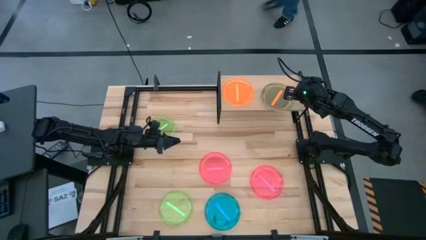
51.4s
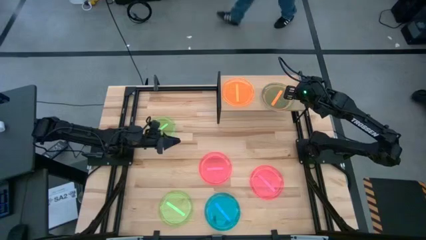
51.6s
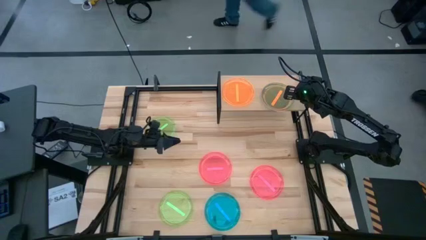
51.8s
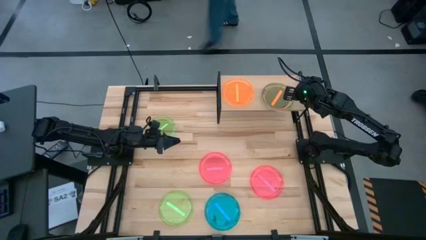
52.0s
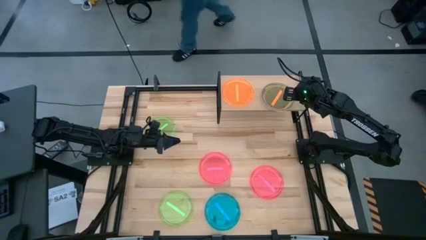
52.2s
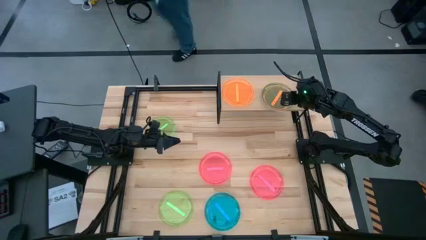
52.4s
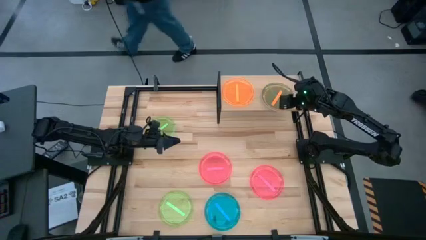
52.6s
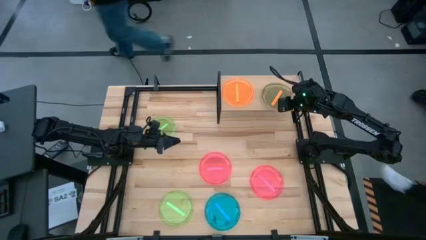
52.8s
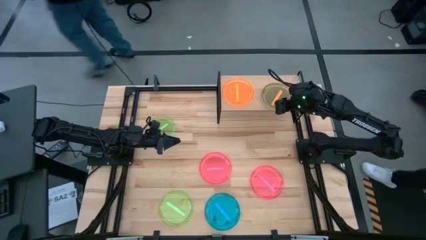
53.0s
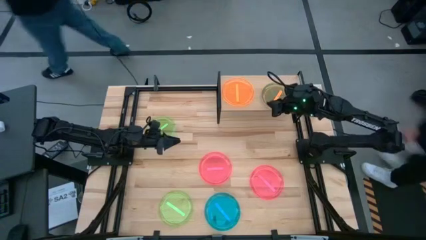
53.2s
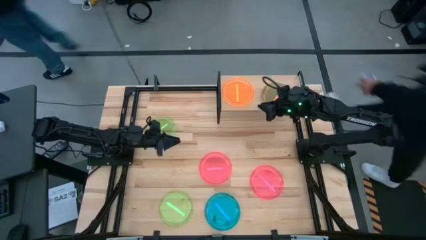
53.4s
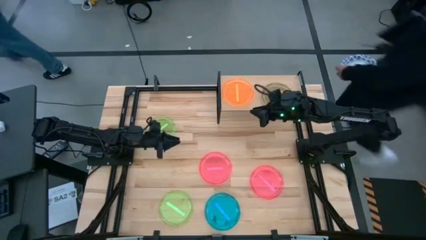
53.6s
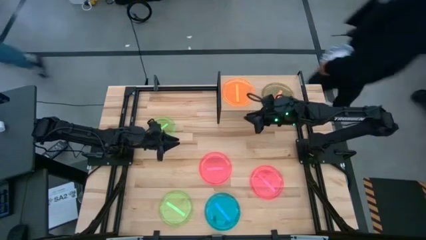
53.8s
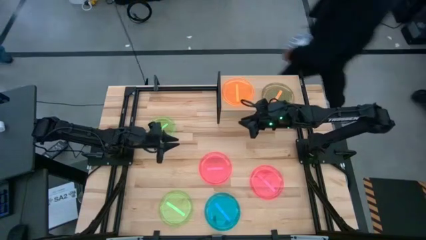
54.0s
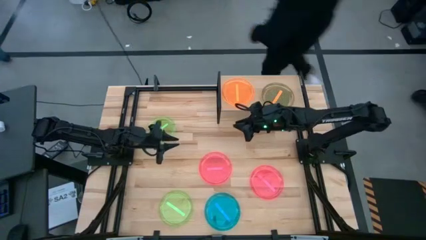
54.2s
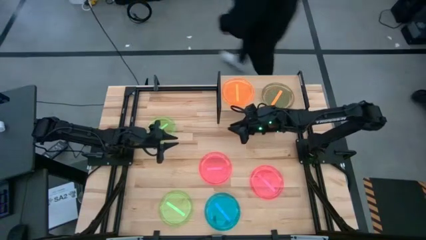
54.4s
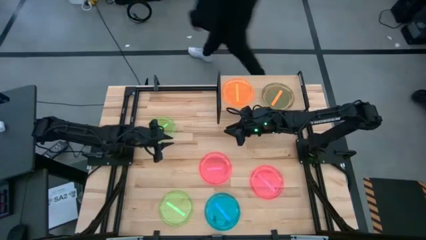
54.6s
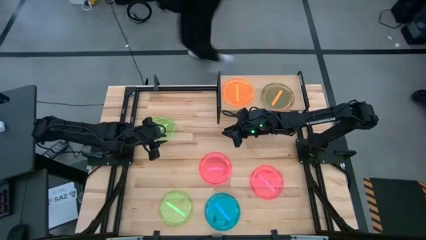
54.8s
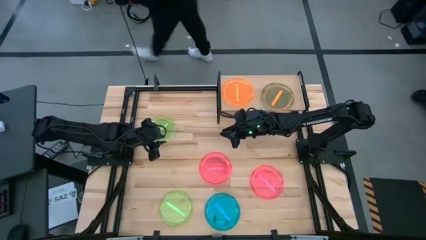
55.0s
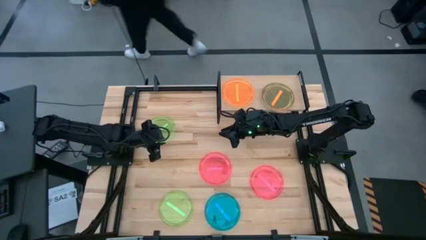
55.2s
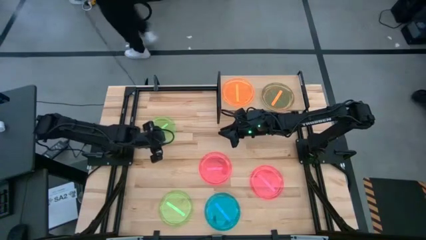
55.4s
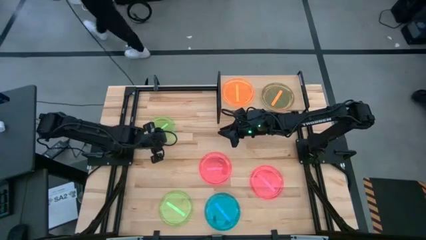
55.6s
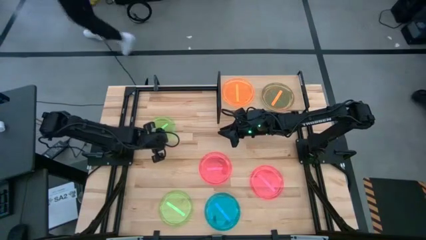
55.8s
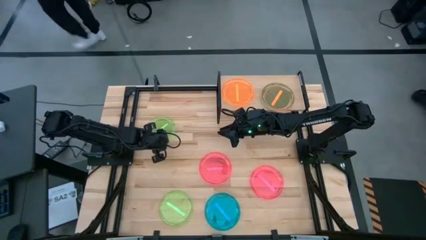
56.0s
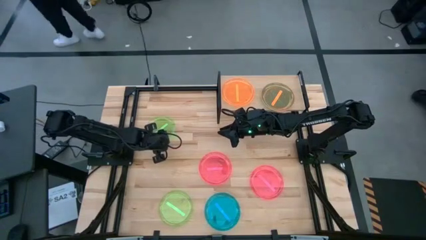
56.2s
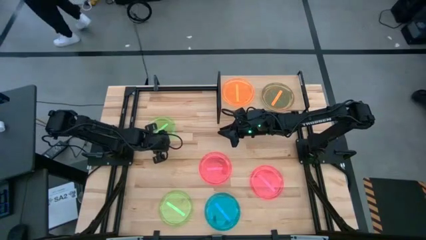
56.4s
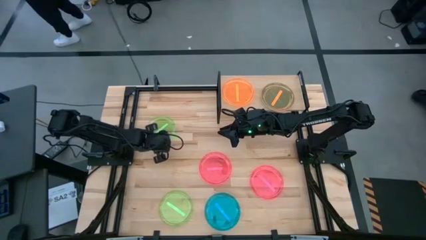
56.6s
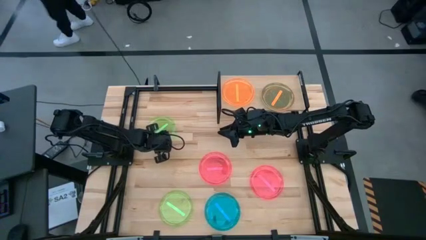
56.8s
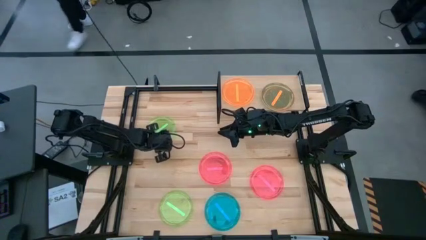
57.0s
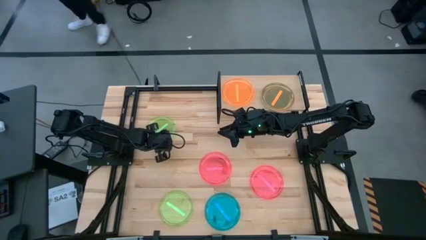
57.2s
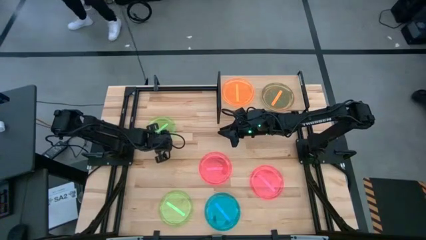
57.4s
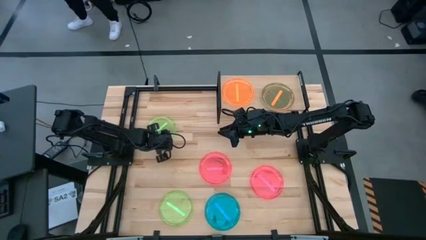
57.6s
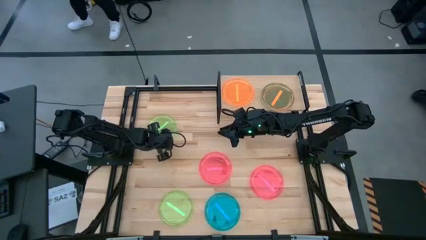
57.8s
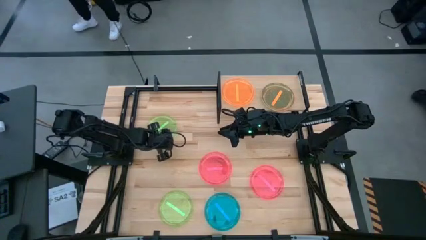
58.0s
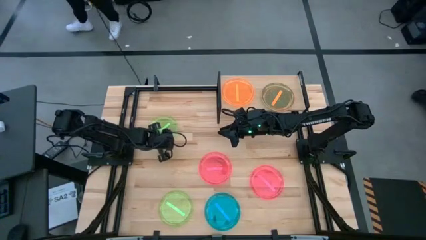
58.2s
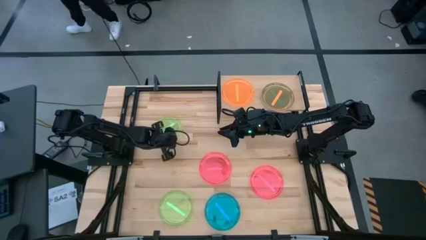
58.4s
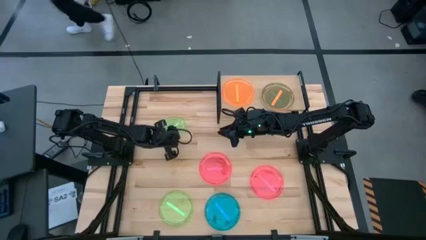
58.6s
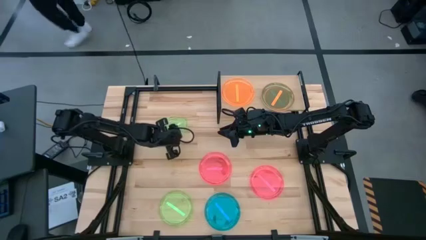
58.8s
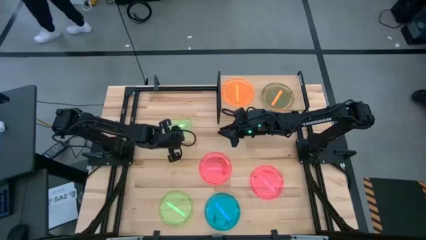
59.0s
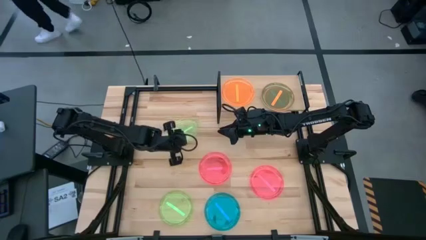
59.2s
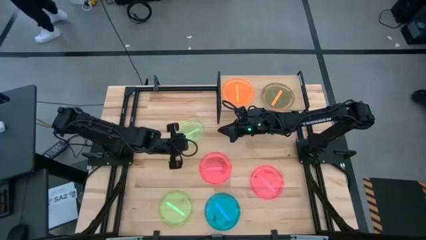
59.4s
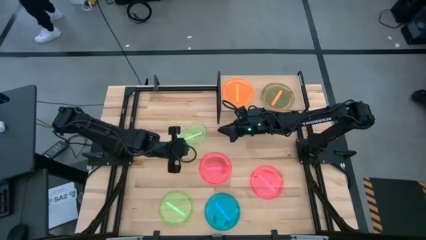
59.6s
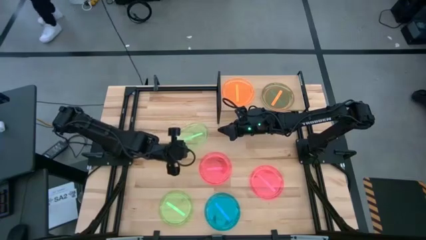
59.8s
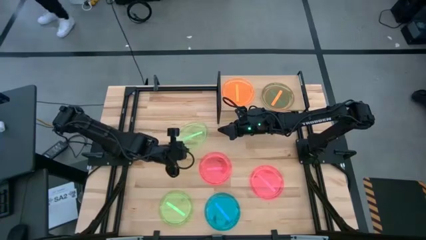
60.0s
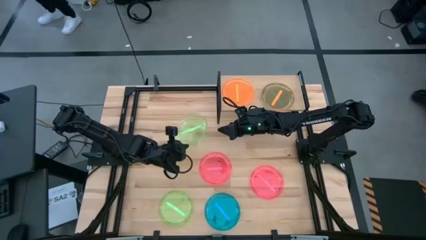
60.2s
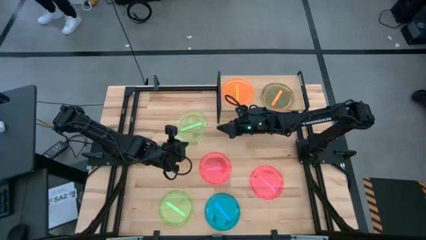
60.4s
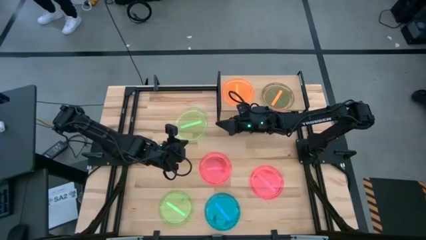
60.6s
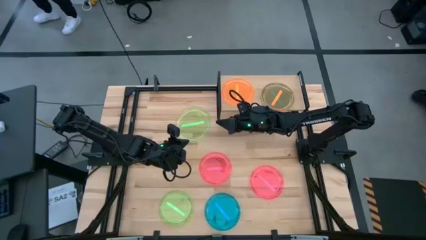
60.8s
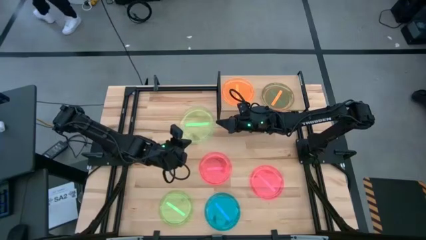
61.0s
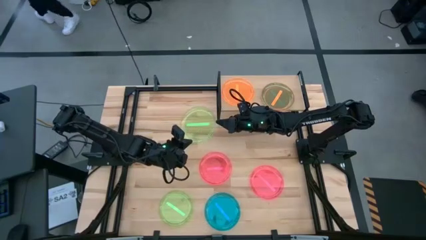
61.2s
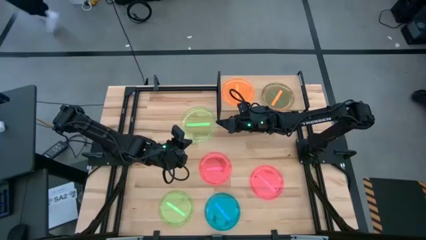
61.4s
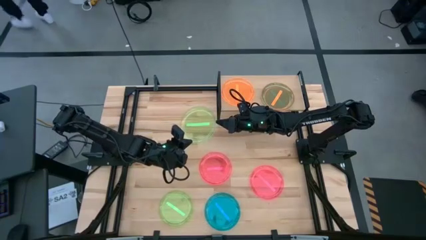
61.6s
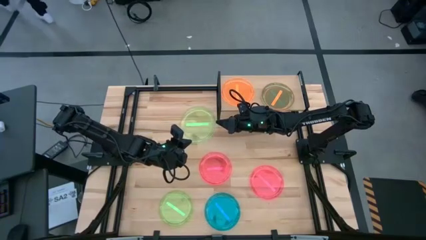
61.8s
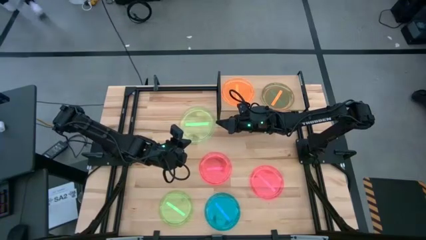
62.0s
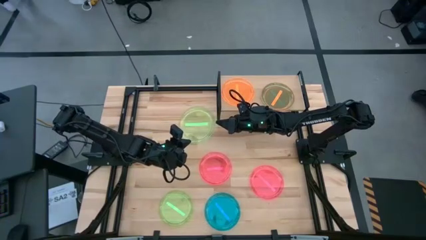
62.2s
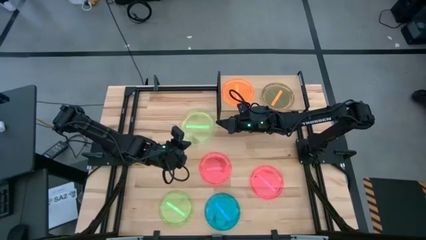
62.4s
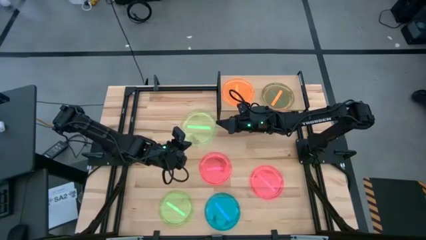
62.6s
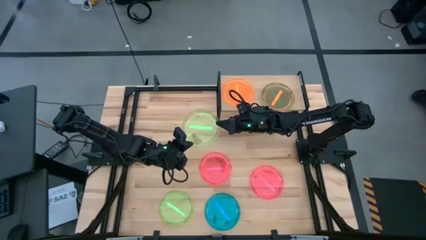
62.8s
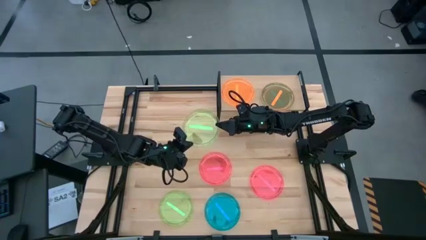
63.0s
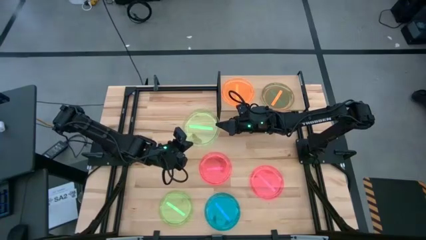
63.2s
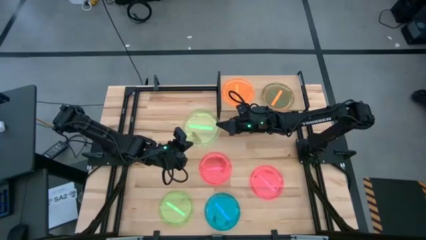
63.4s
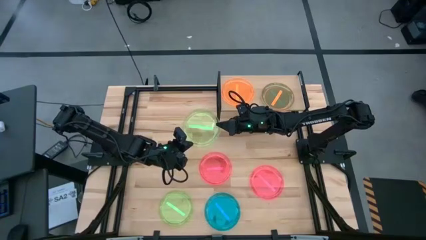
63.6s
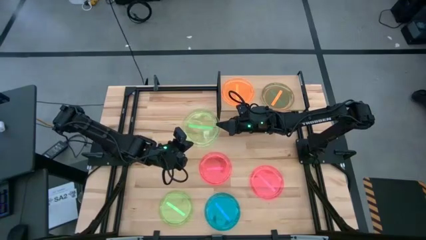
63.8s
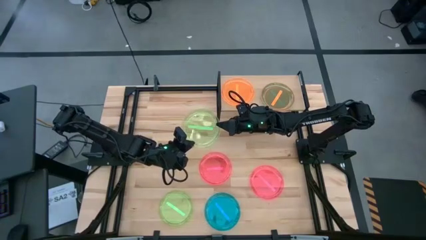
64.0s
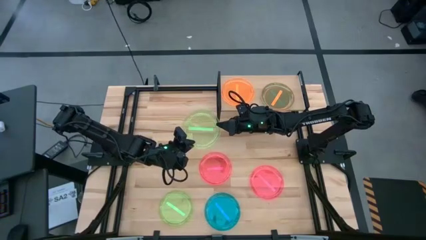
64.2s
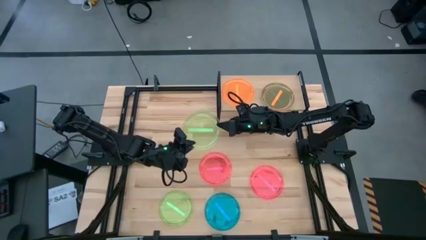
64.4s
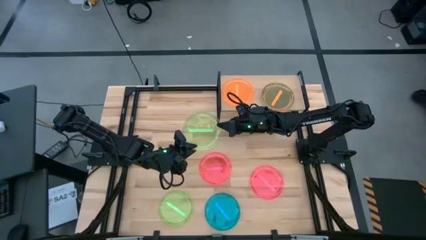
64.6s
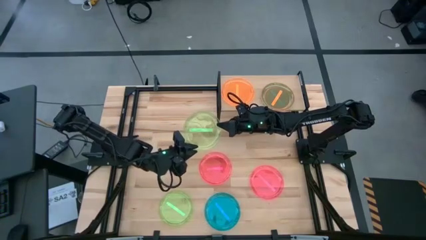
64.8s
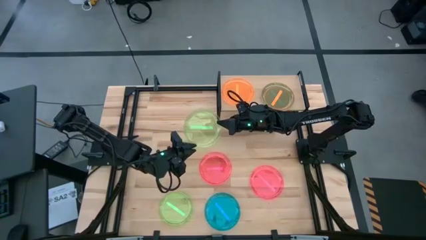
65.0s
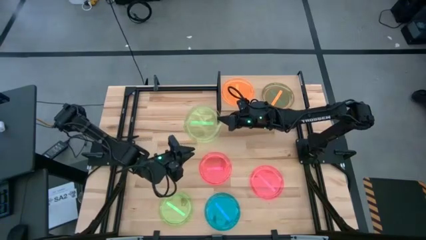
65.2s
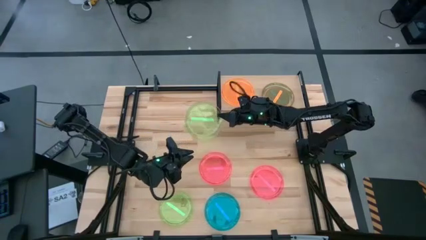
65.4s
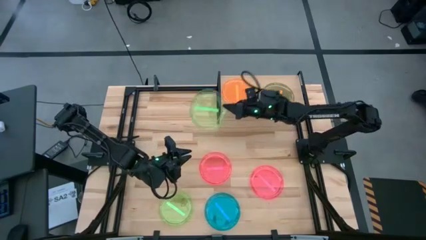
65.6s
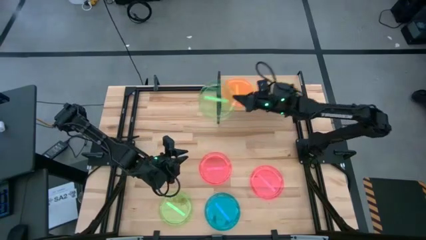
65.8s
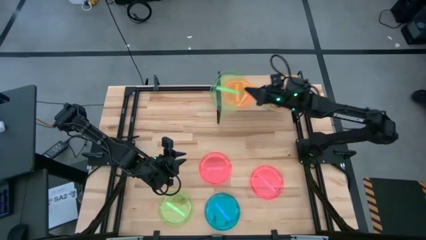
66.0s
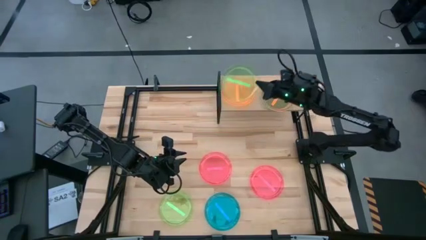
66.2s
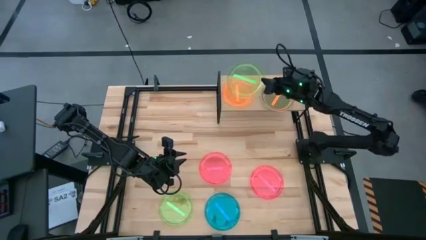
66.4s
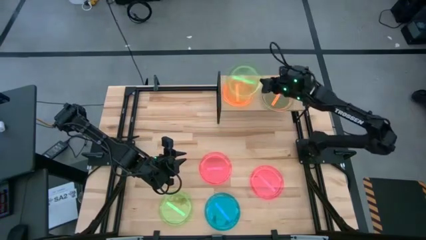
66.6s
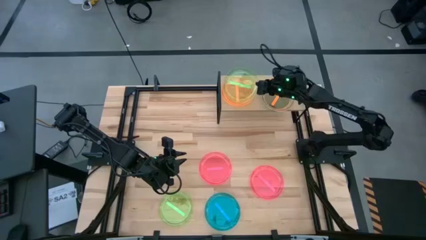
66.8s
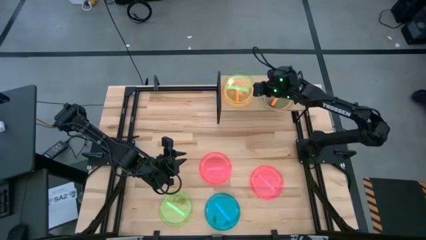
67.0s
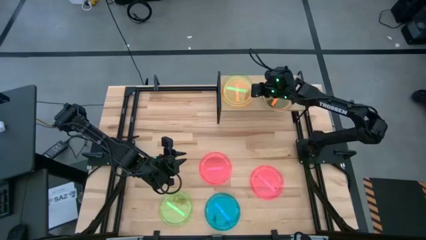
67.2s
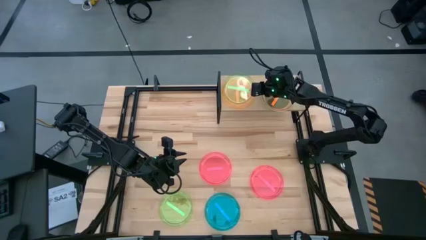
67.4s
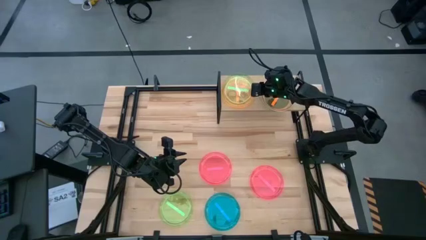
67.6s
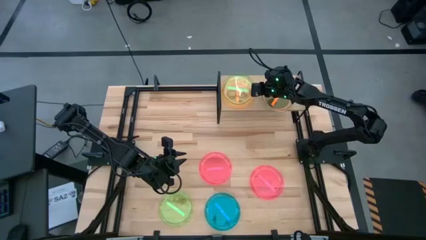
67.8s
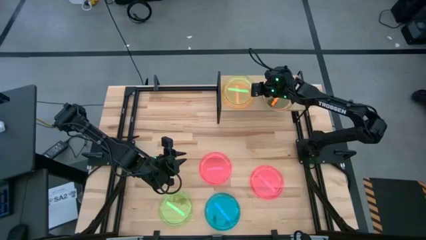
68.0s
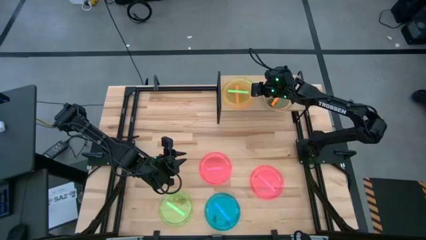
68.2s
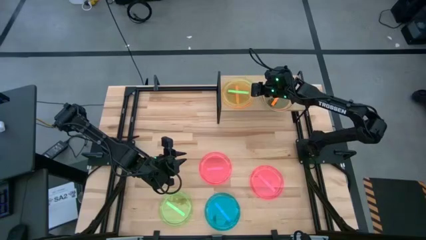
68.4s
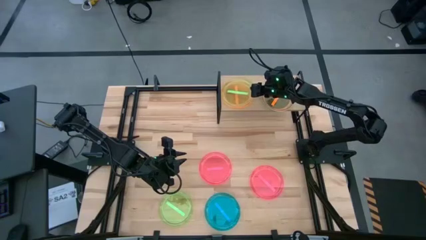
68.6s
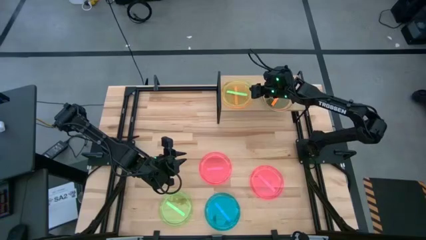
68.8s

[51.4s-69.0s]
Task: Place and stack plates onto a shelf
Stack the top green plate on top of the orange plate on the shelf
